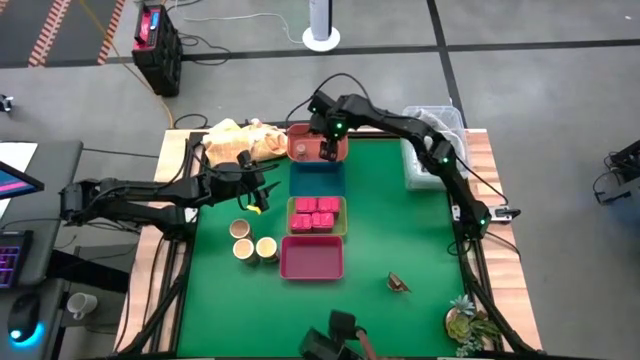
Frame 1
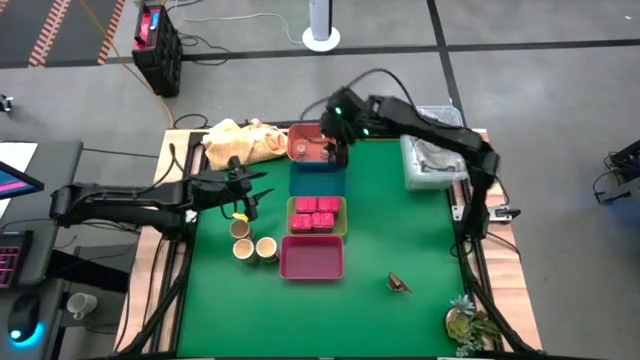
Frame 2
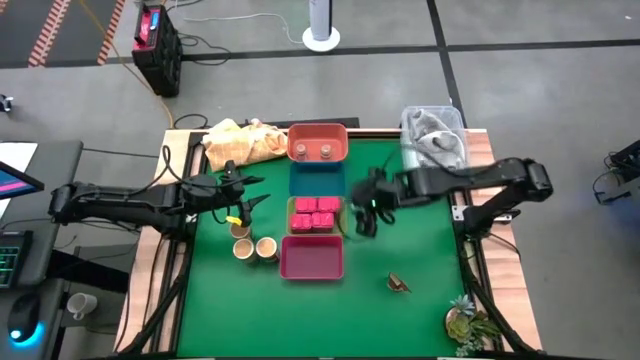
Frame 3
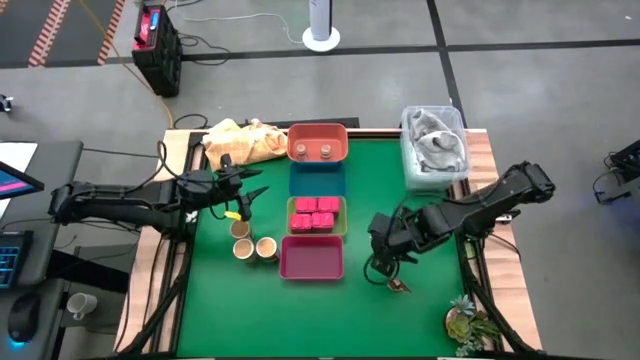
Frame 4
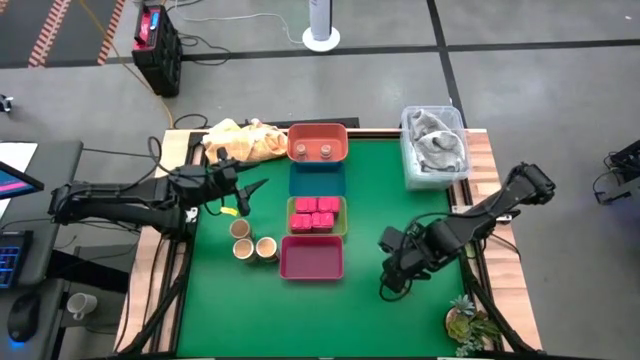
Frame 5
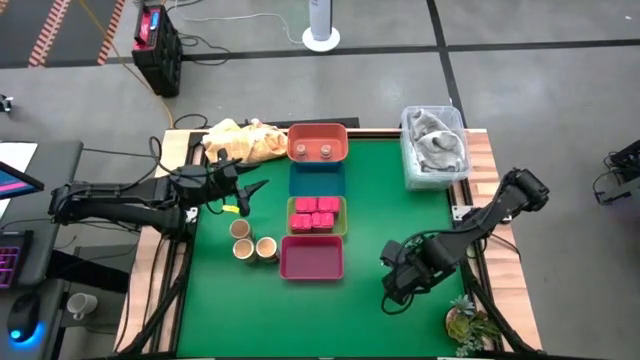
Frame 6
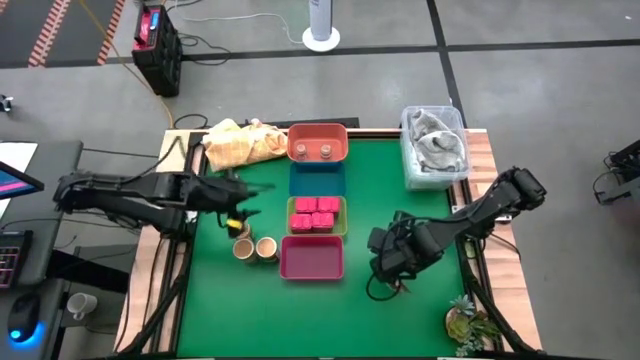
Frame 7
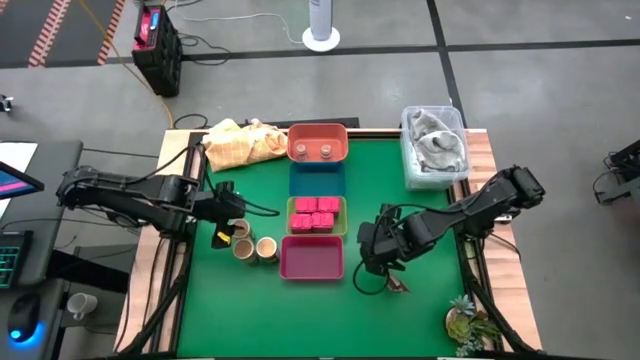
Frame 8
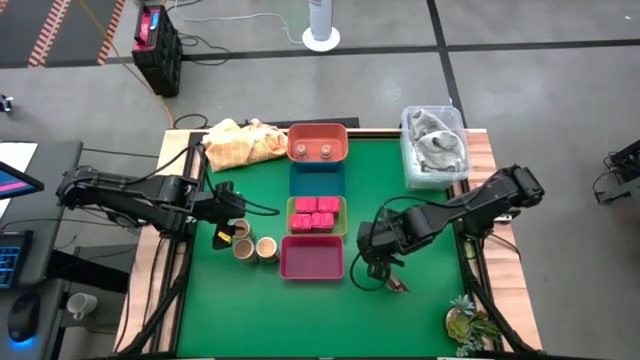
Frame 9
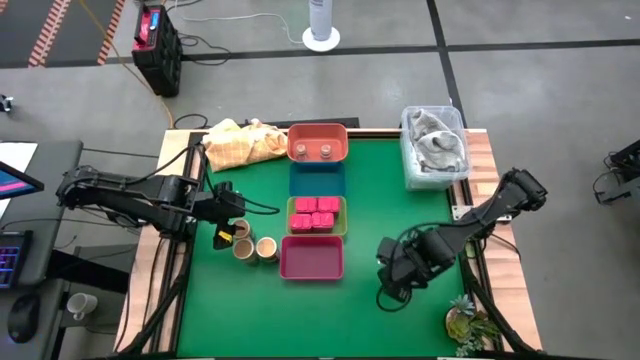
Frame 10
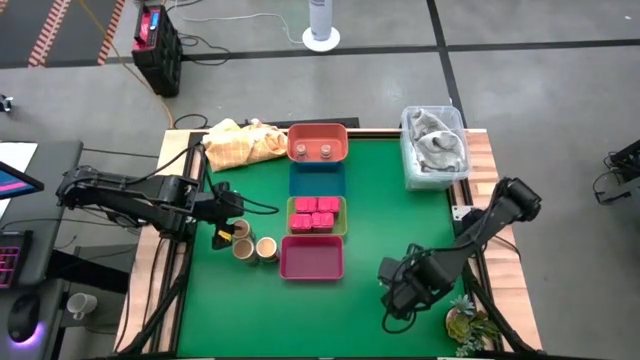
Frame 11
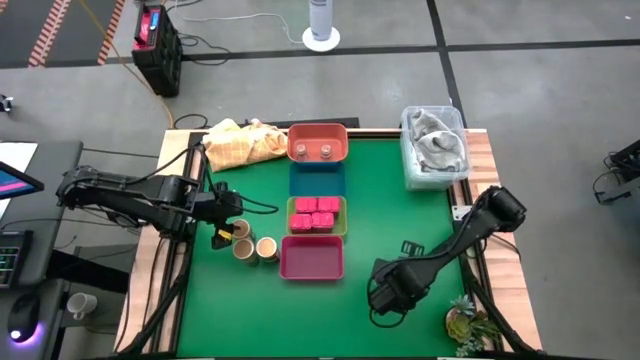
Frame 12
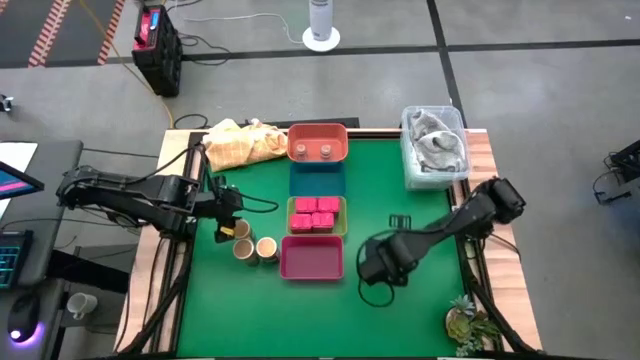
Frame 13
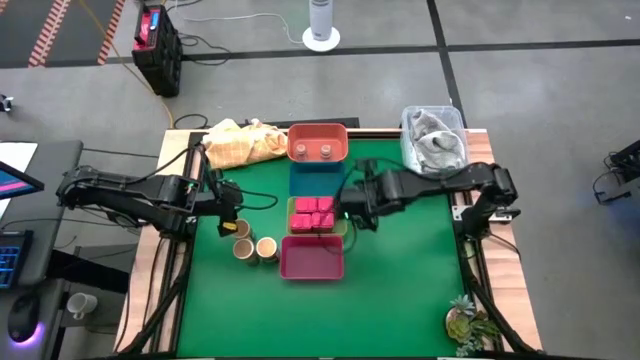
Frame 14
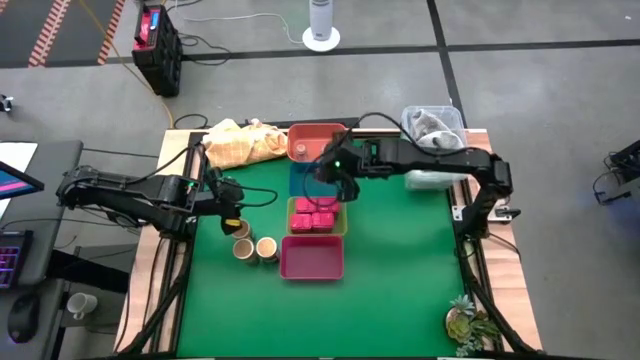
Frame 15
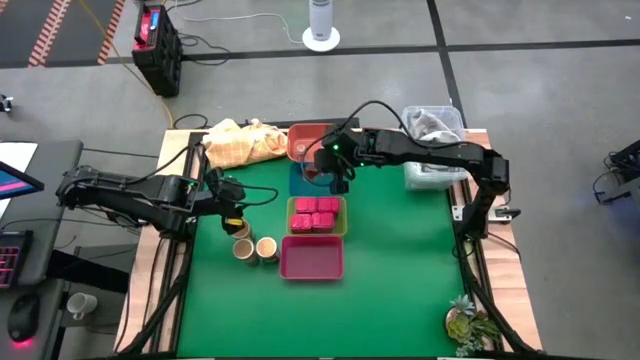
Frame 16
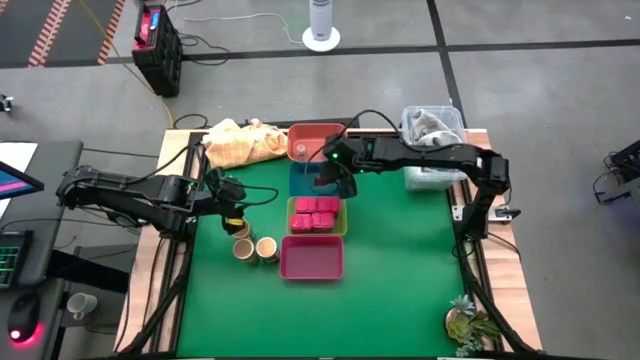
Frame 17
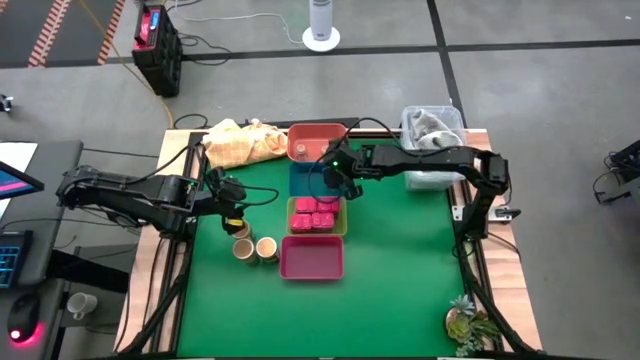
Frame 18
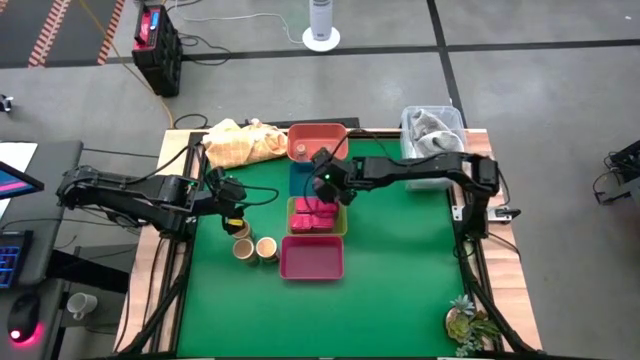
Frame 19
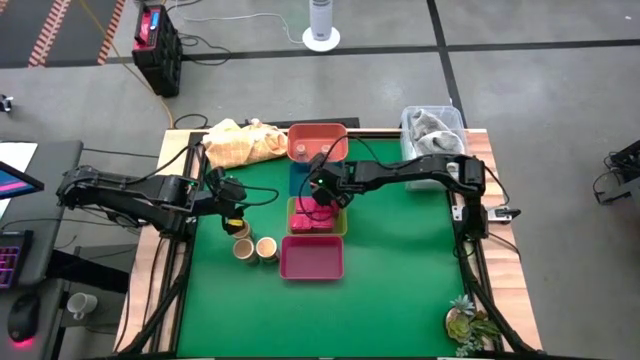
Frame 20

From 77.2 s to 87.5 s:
Task: Sort spices by type
Put the brown seasoning bag into the blue bin

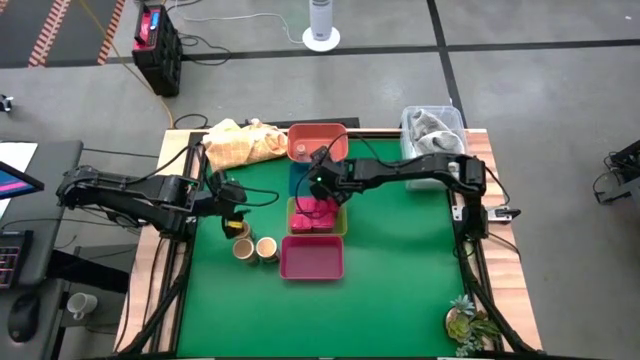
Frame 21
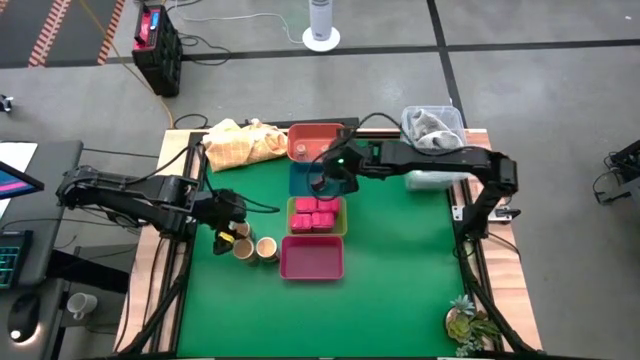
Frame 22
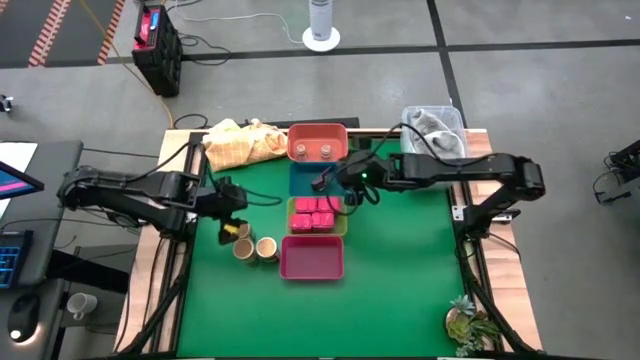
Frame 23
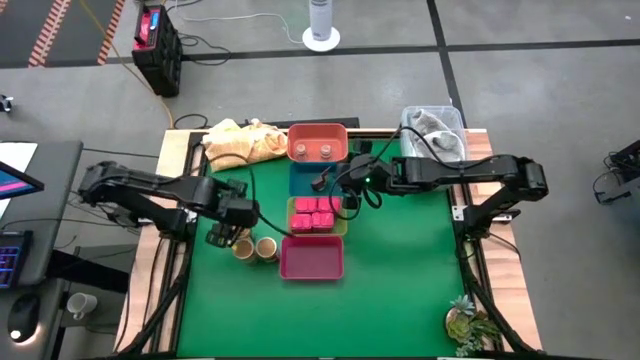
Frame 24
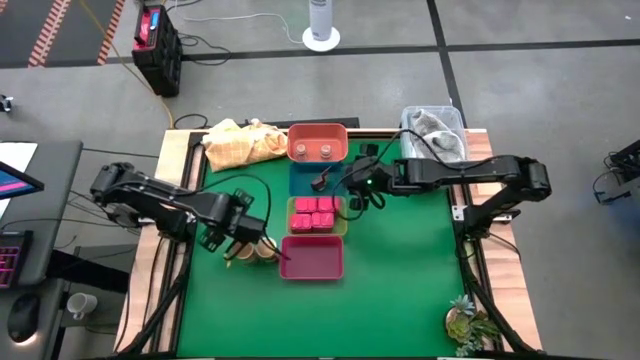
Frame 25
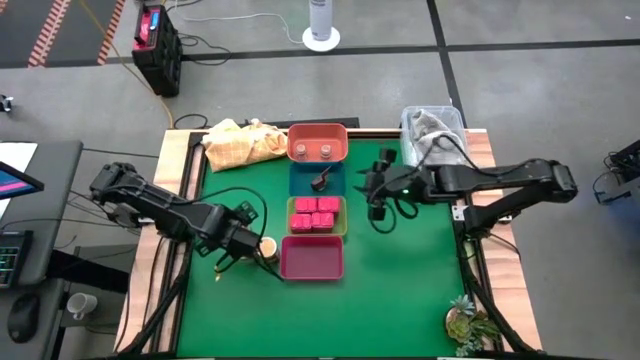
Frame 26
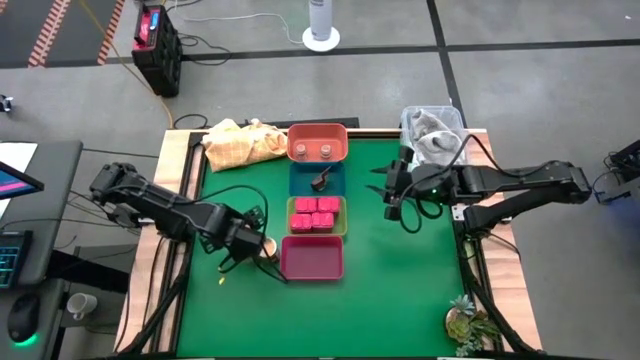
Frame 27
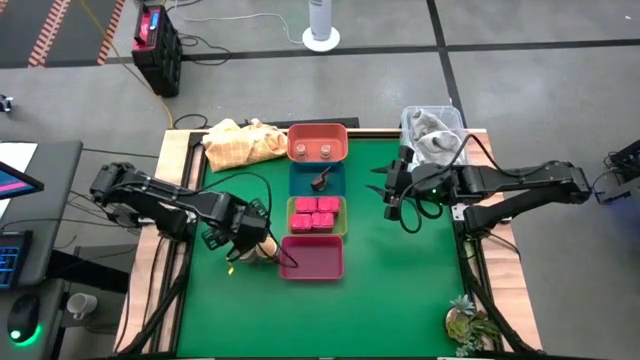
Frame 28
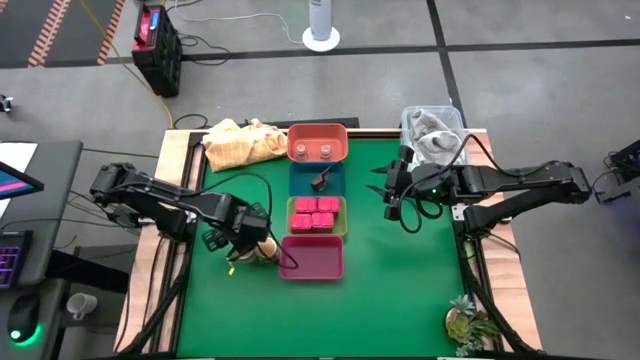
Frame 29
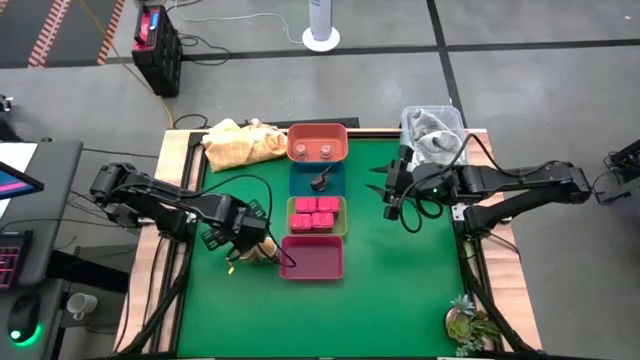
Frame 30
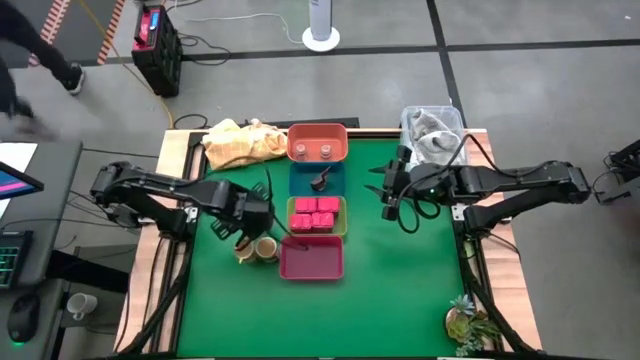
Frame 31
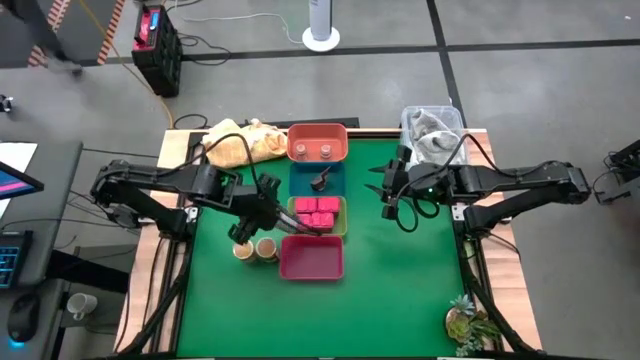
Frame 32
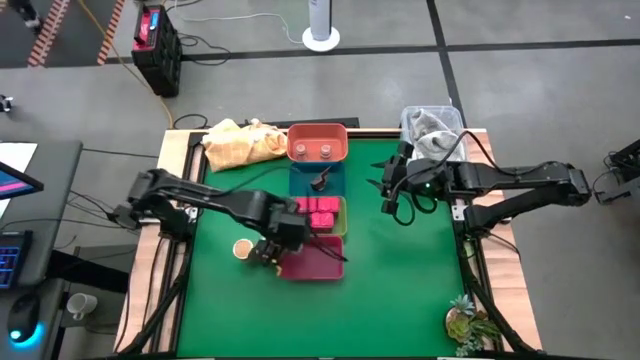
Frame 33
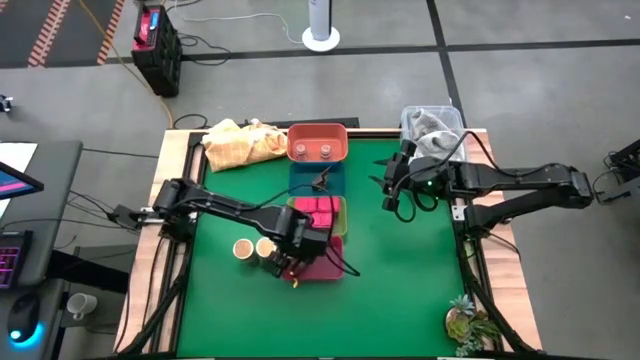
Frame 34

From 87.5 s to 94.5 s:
Put the top brown seasoning can into the red bin

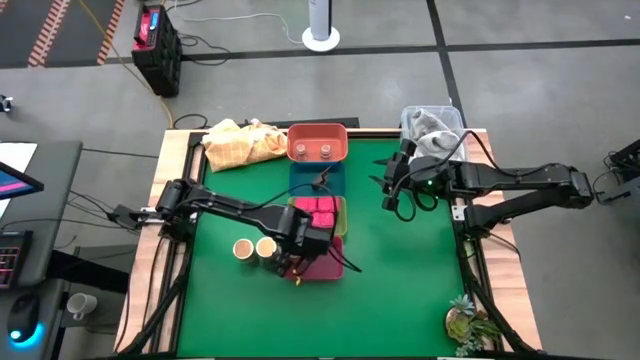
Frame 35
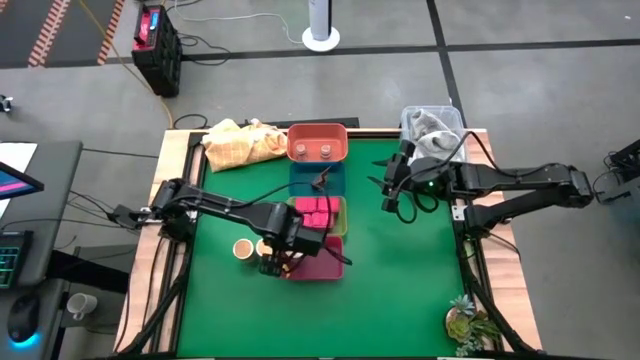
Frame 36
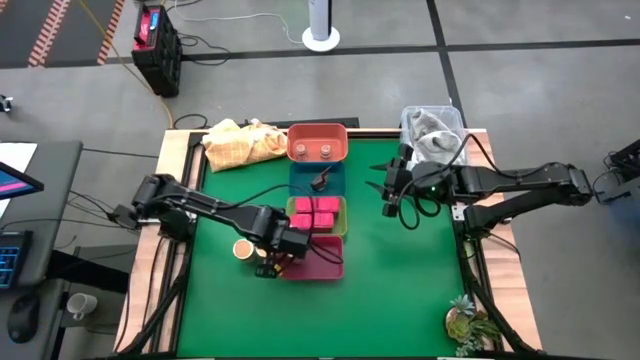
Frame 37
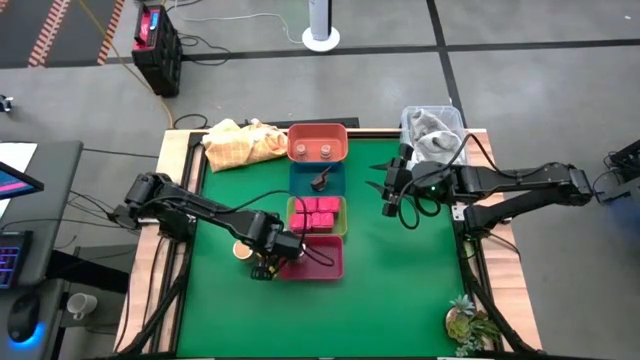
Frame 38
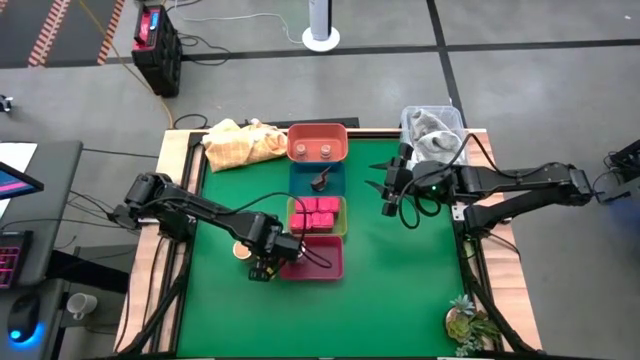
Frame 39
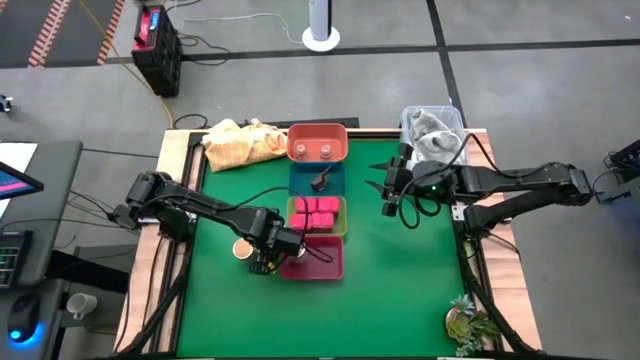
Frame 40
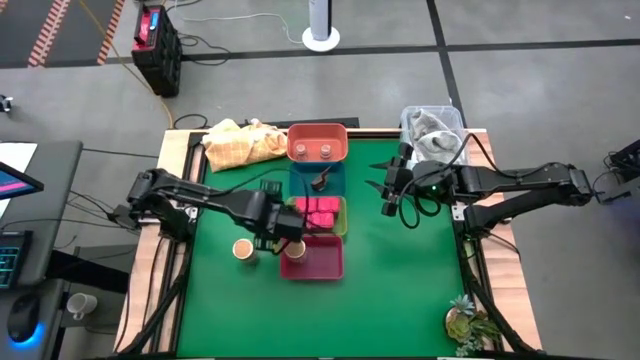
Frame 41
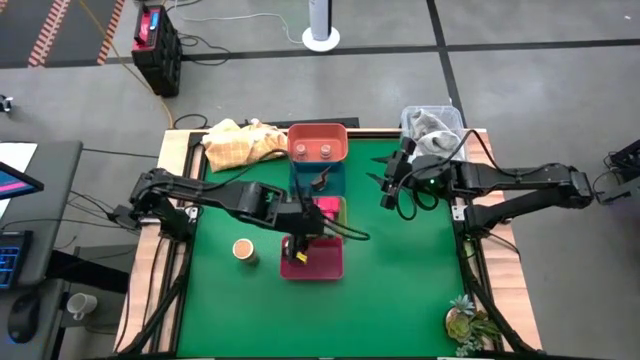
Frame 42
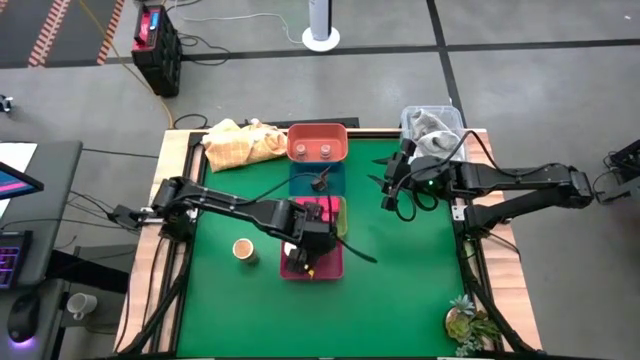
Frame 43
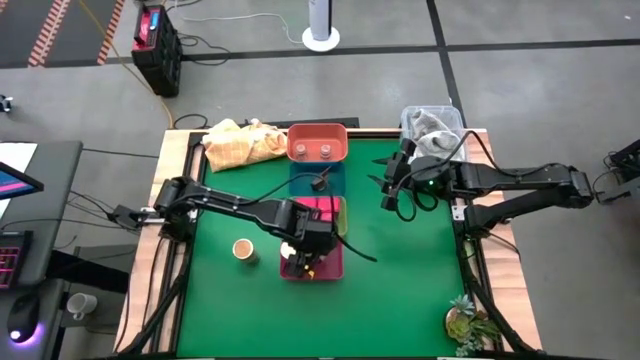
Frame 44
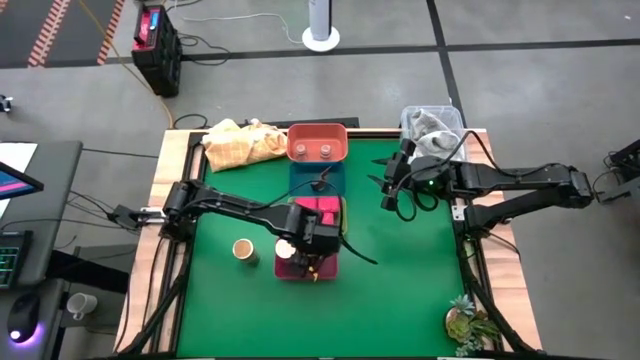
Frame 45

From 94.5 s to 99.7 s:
Put the right brown seasoning can into the red bin
